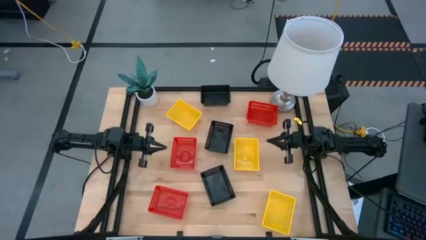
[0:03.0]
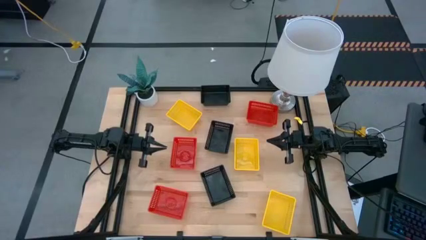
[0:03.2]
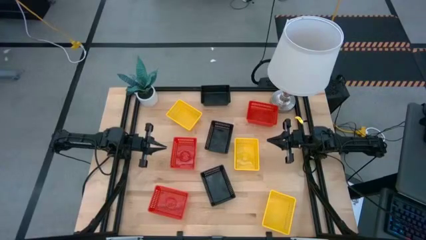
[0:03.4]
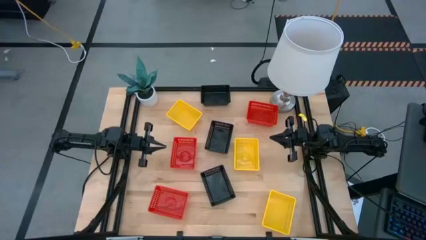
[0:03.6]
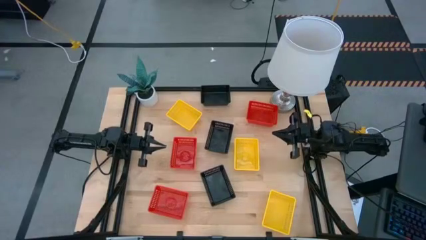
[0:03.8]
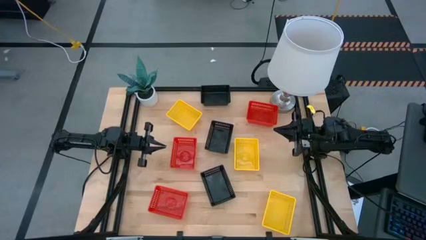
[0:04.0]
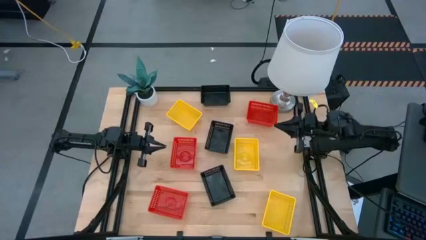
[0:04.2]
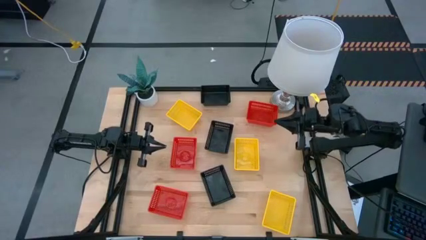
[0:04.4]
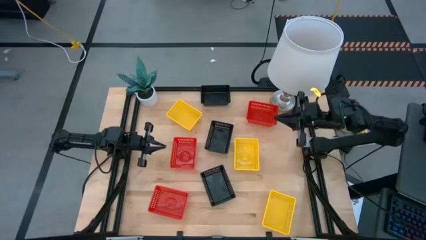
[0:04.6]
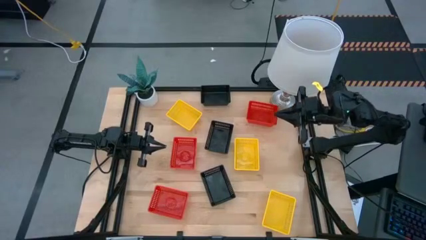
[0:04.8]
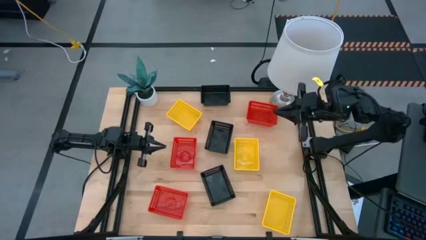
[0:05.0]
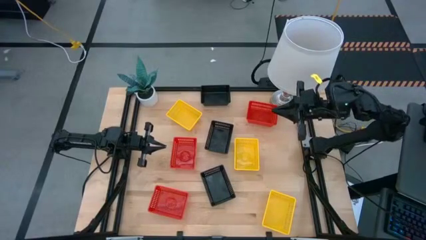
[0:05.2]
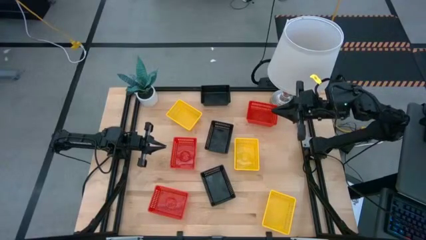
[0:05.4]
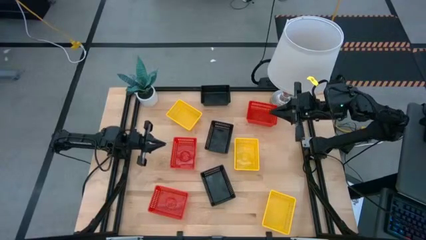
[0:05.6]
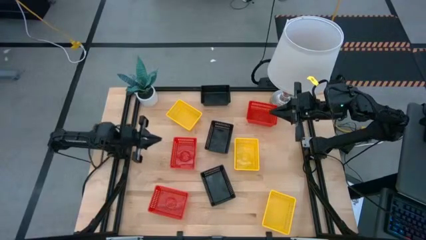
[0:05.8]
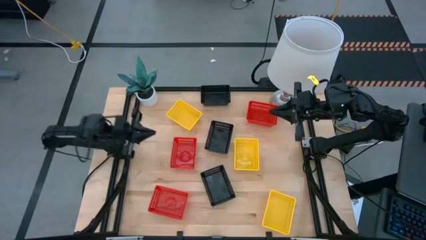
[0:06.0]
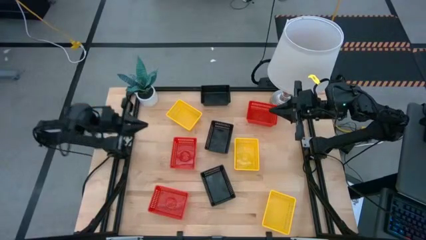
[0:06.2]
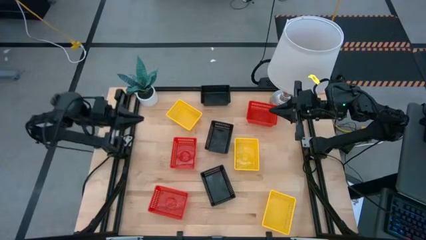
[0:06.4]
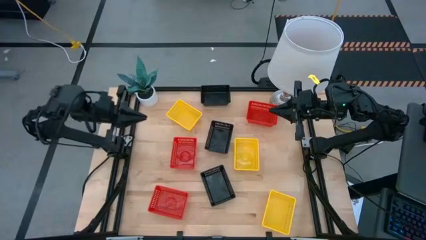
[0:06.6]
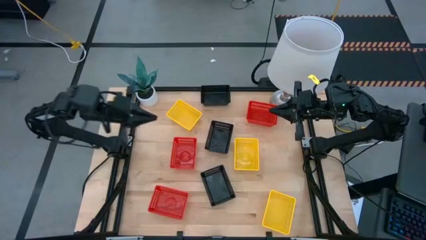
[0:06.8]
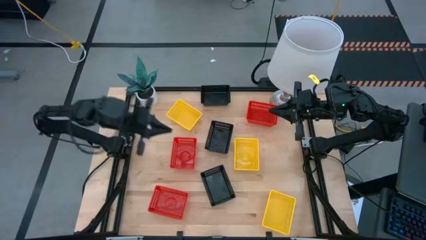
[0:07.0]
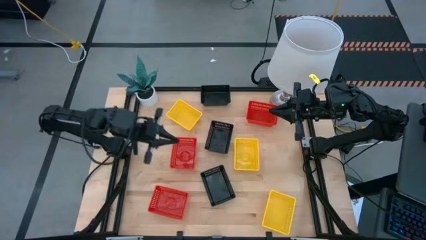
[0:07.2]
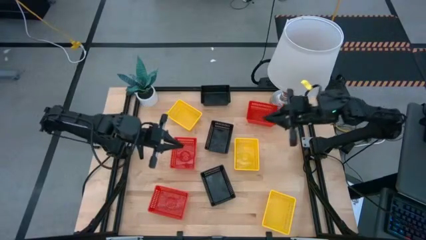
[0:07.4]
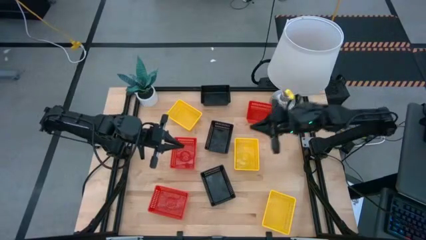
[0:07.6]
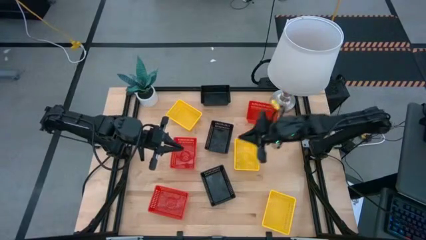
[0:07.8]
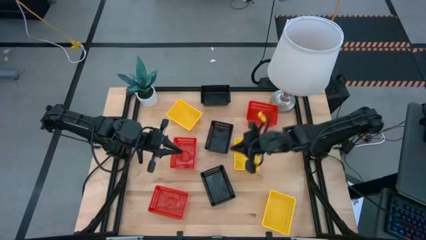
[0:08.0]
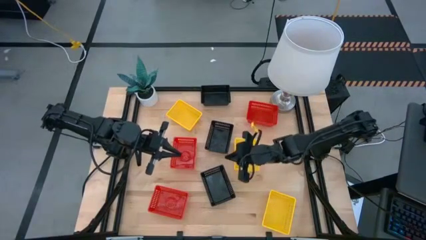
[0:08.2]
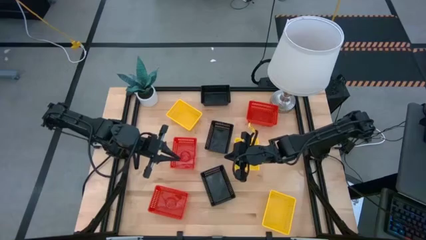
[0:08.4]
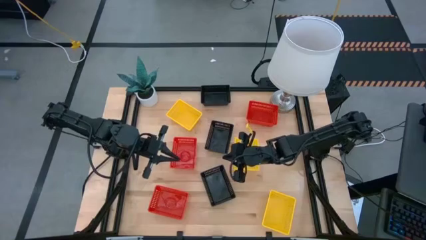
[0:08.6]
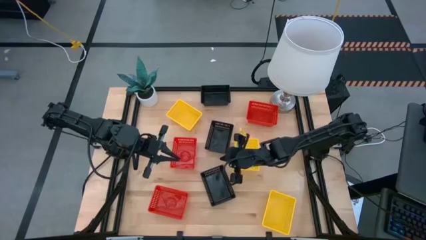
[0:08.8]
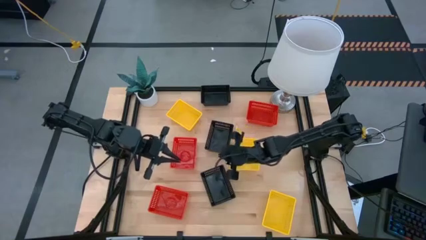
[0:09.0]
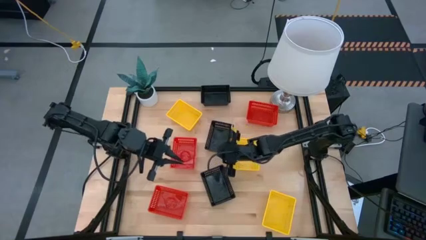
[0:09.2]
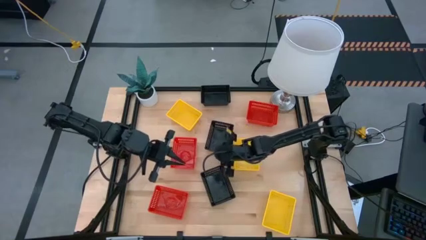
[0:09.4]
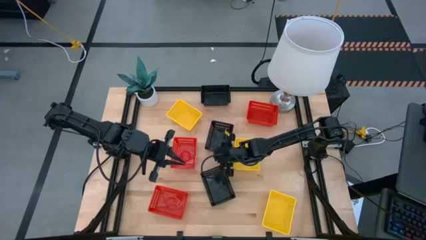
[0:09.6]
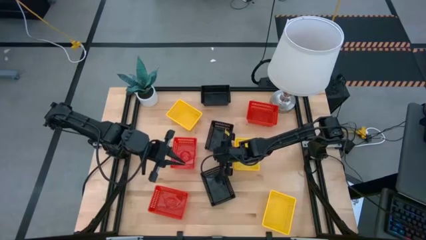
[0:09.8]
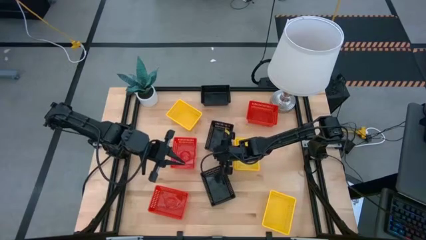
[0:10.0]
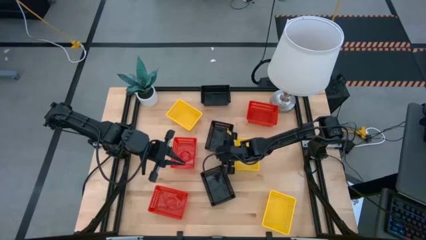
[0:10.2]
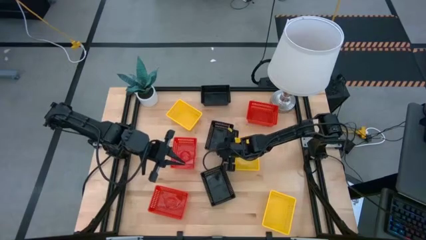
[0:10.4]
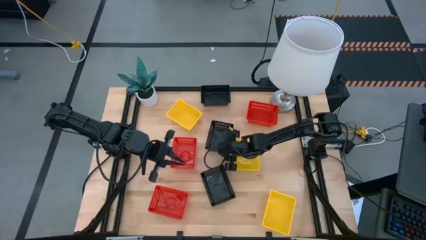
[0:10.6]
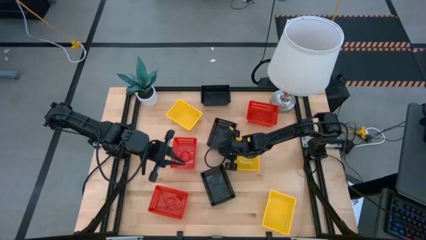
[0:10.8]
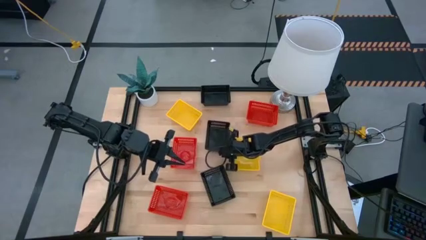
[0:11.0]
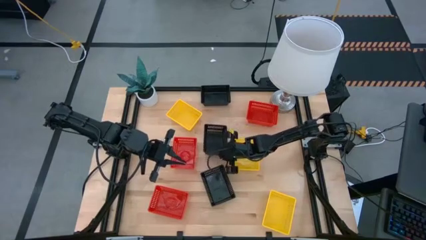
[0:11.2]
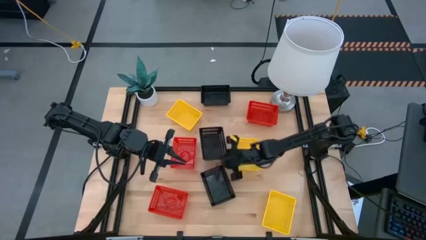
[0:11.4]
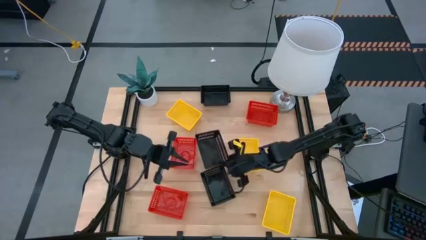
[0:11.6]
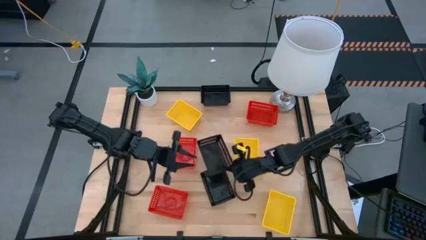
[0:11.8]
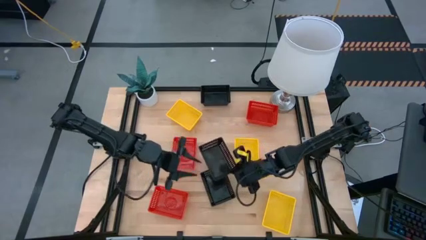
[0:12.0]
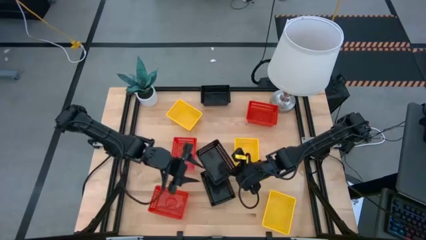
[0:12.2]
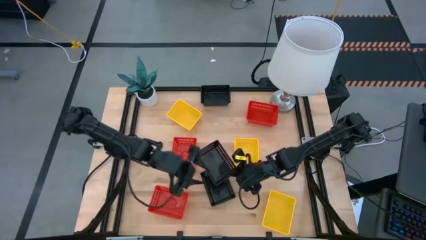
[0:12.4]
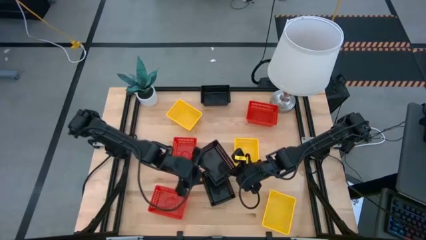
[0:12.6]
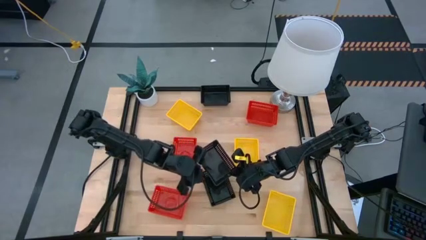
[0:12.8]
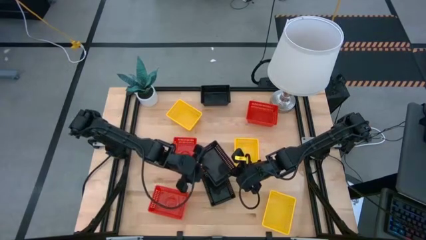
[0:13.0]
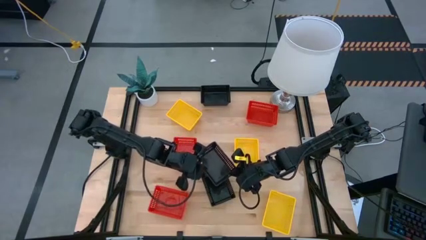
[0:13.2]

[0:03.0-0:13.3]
Stack the center black basket on the top black basket
